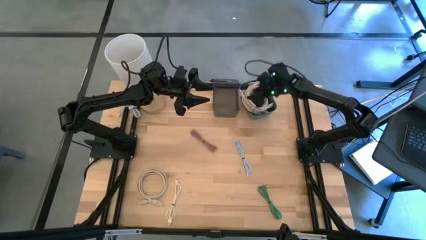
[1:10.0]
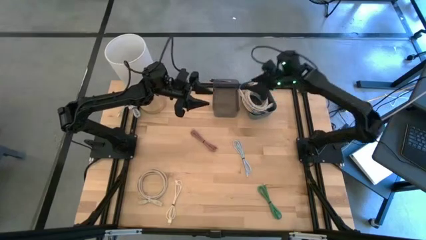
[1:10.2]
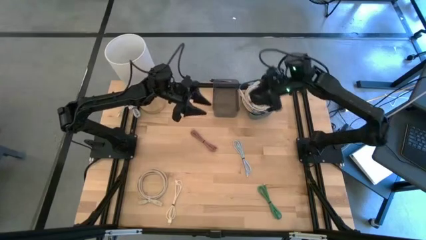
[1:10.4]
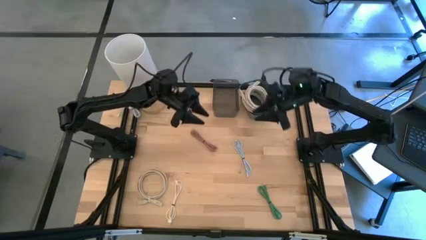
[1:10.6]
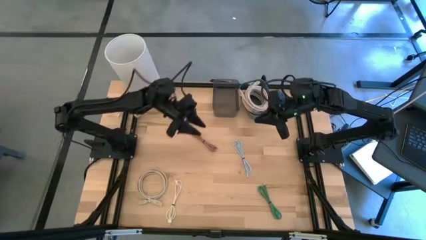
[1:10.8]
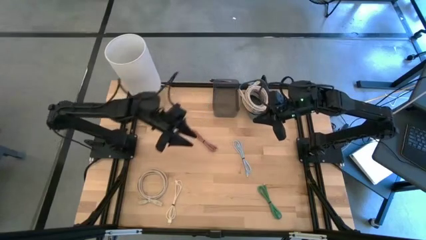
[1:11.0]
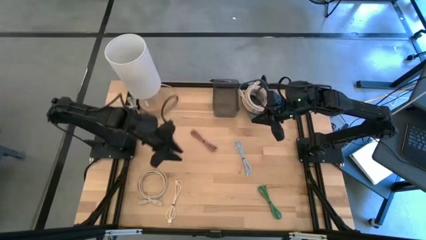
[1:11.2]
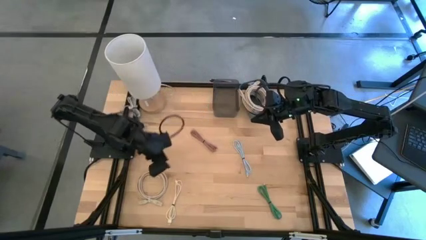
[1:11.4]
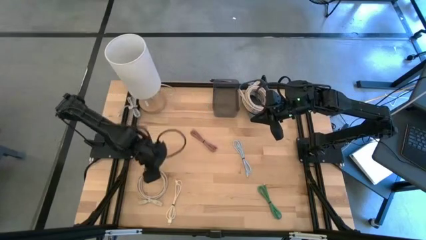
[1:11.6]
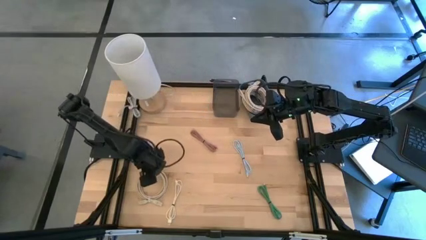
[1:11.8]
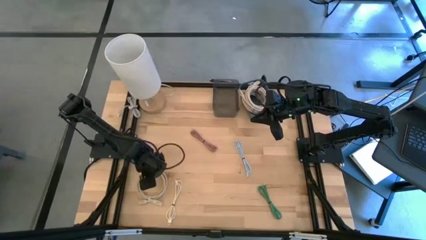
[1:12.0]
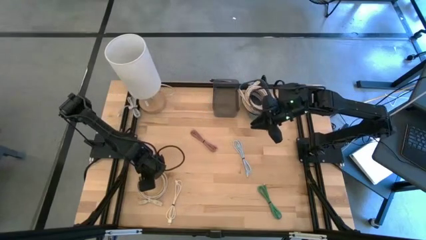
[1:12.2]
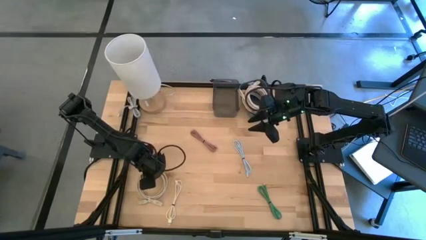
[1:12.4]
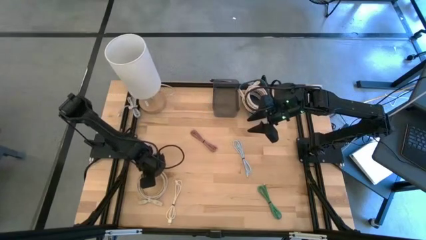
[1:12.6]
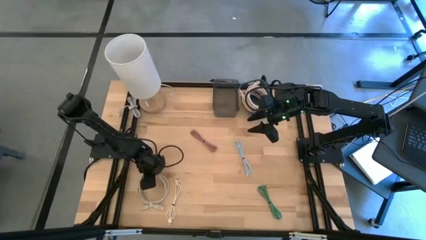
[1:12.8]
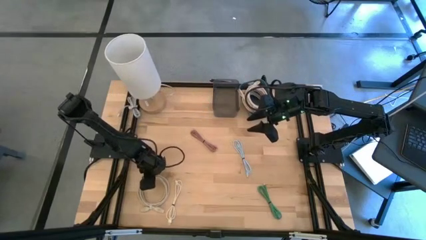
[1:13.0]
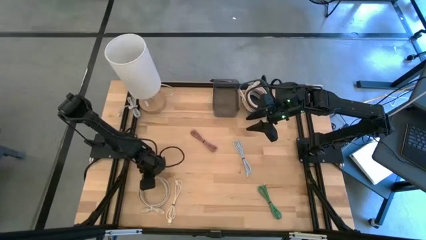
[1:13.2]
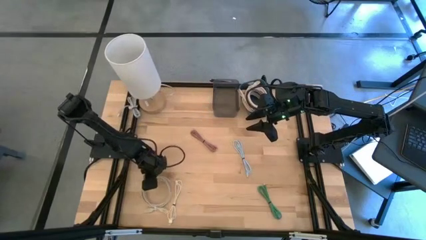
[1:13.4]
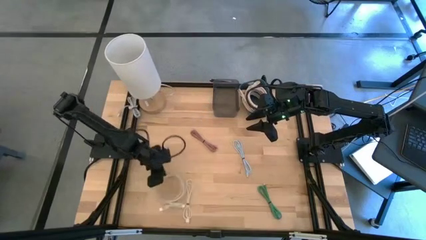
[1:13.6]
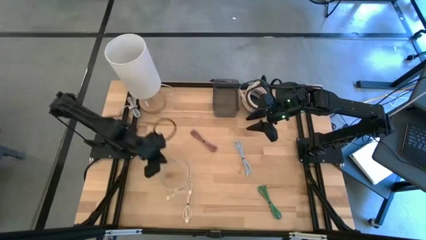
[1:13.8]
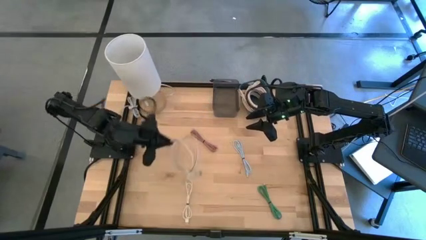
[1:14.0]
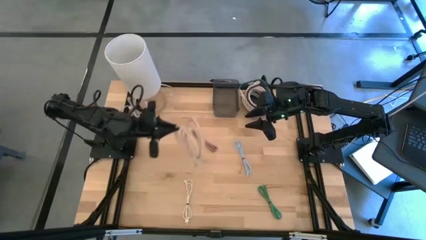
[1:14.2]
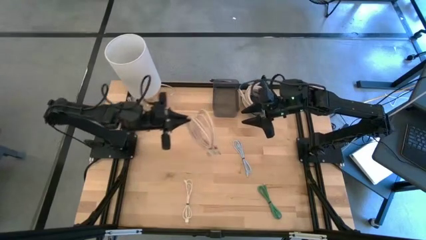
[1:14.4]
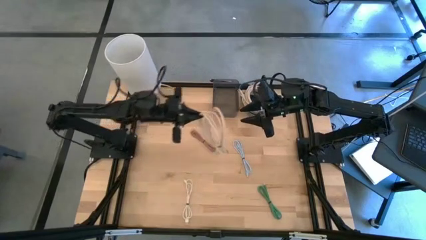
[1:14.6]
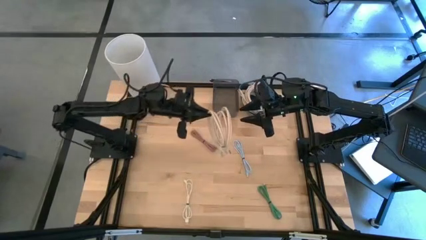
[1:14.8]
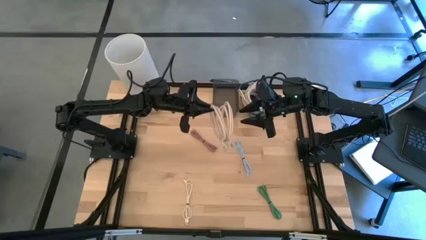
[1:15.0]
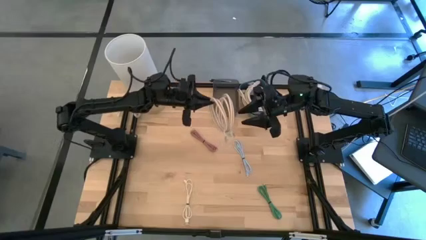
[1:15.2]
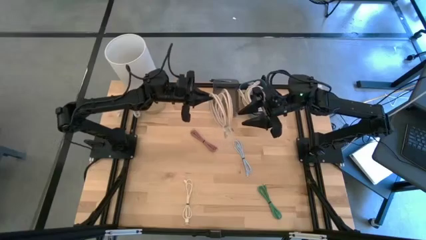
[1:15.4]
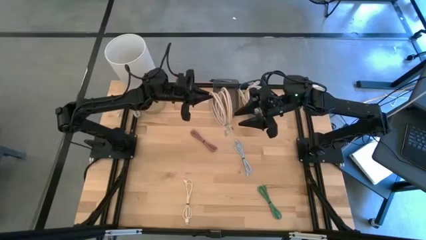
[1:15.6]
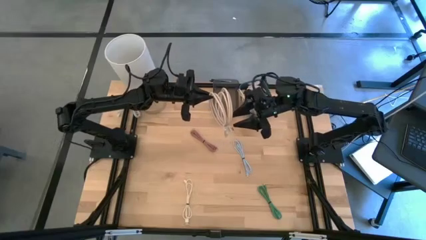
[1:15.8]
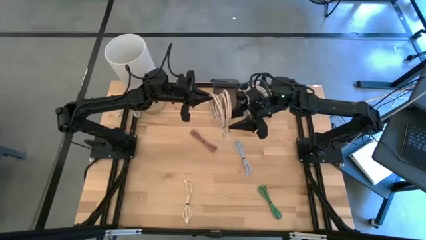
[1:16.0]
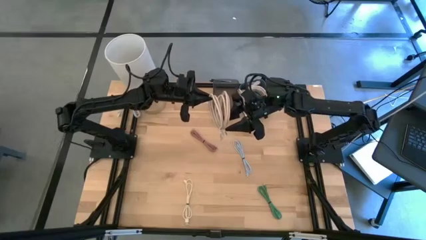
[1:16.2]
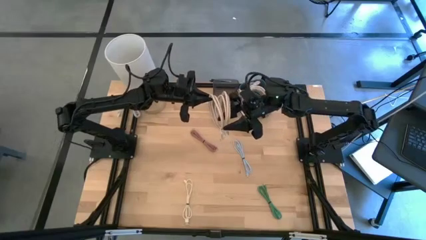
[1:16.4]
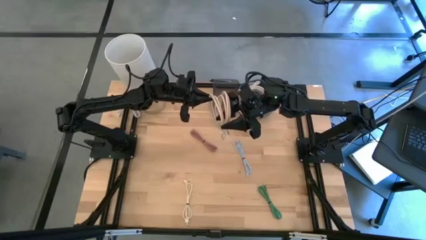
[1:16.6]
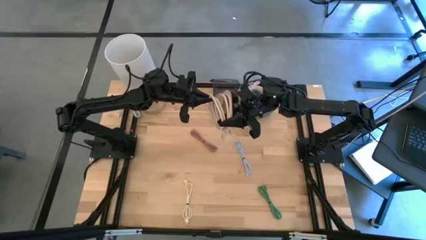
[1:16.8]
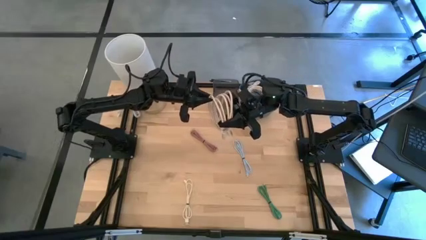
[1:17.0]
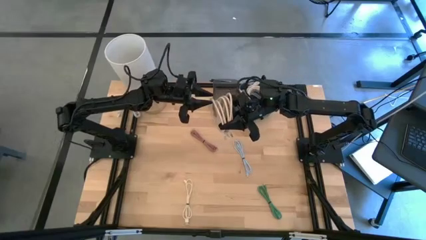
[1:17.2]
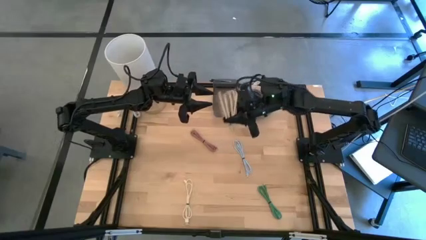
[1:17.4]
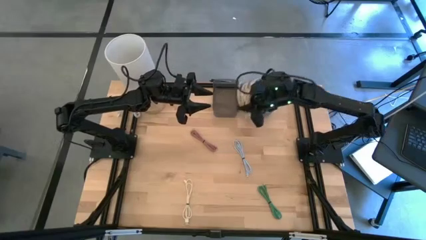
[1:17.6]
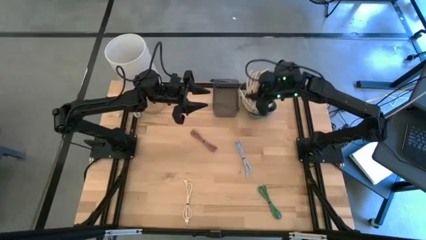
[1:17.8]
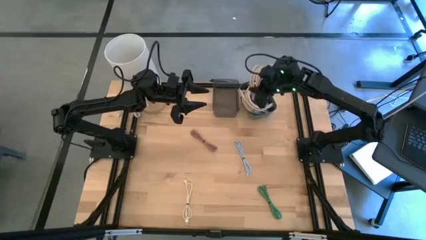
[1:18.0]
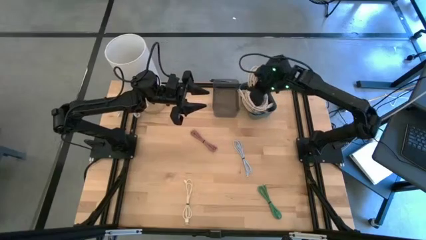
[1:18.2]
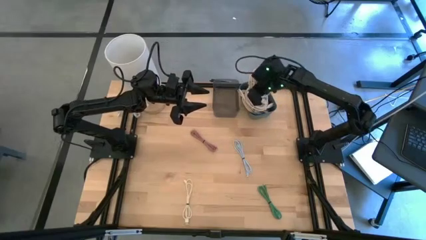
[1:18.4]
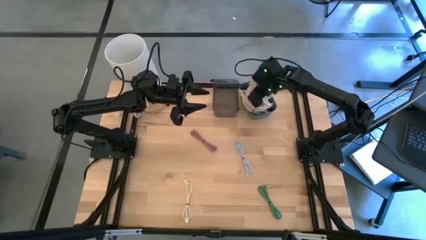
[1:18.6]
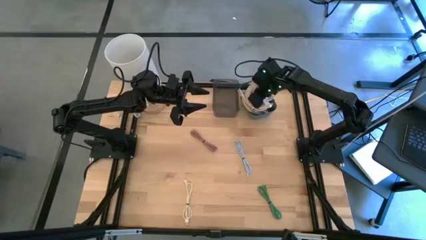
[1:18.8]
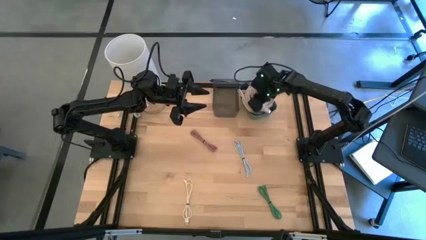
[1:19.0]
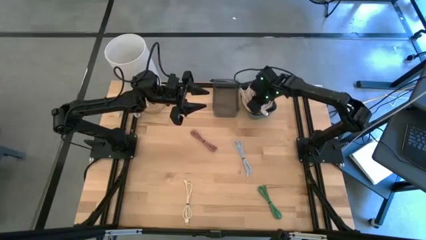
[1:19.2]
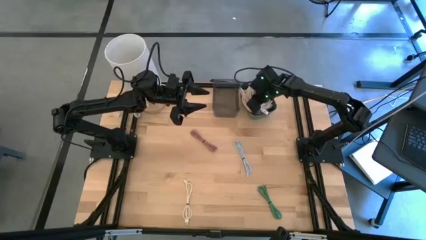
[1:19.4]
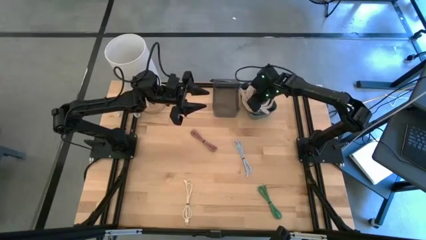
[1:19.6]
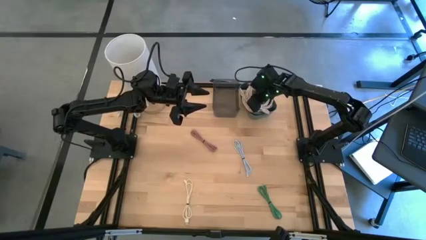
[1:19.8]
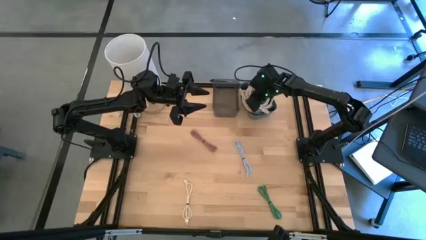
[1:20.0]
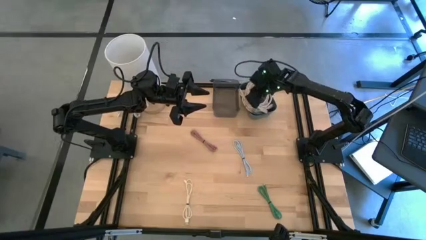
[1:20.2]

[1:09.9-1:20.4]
Put the light brown HDMI cable into the blue bin

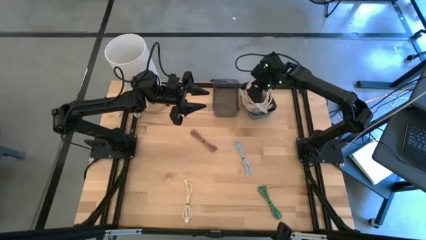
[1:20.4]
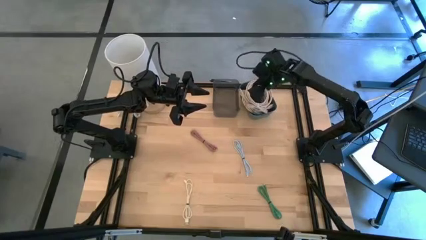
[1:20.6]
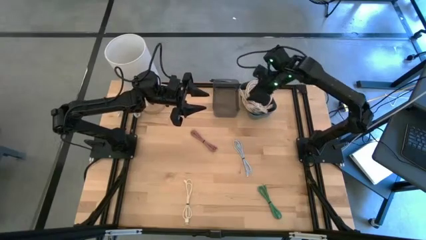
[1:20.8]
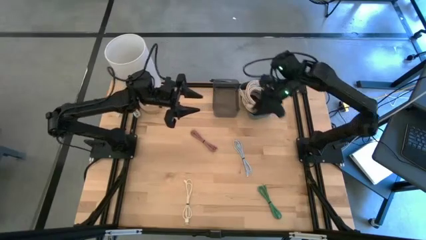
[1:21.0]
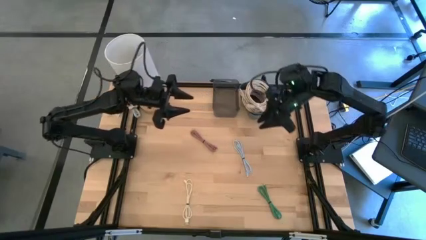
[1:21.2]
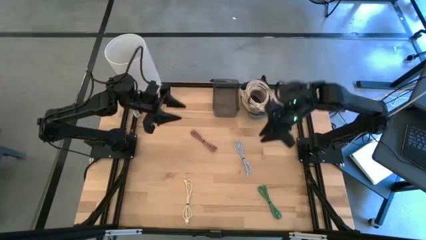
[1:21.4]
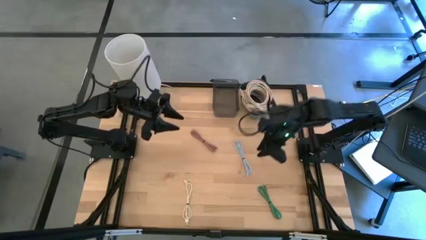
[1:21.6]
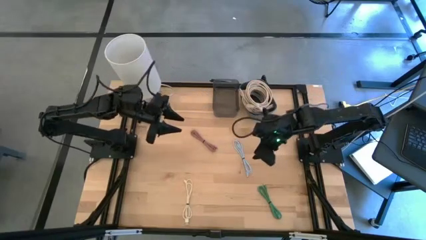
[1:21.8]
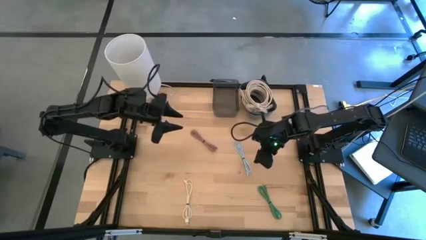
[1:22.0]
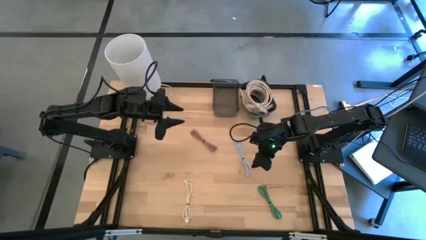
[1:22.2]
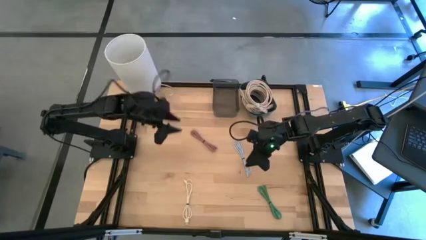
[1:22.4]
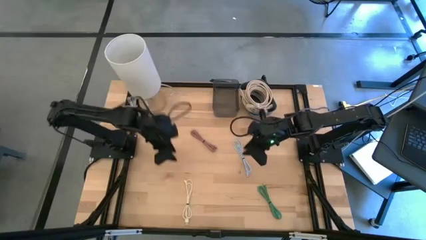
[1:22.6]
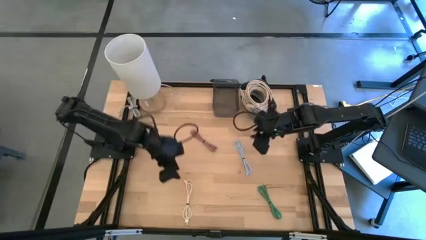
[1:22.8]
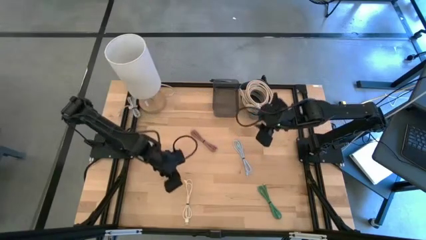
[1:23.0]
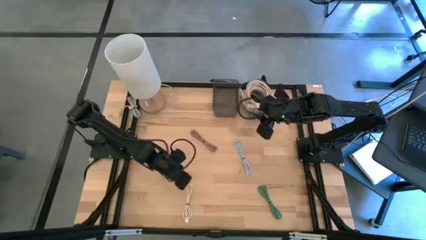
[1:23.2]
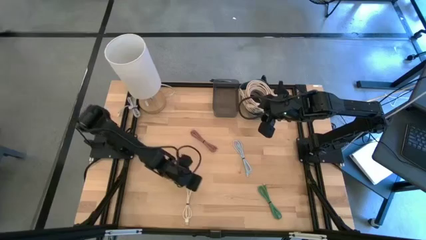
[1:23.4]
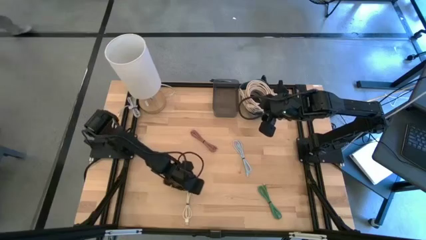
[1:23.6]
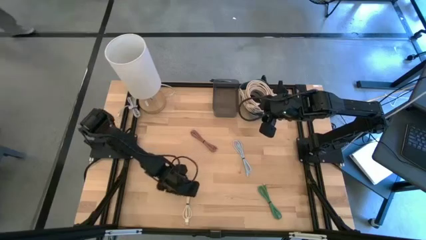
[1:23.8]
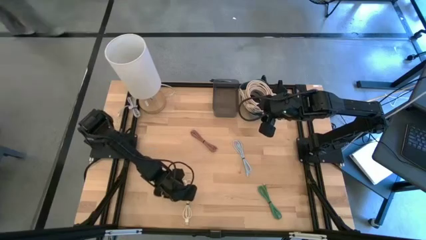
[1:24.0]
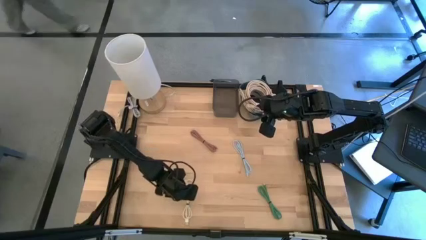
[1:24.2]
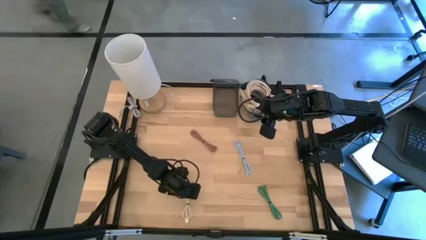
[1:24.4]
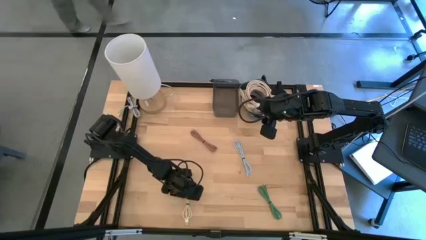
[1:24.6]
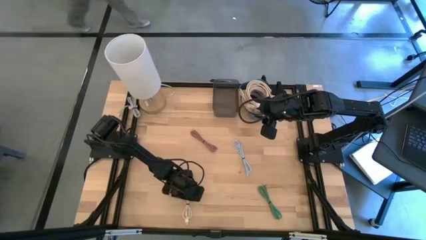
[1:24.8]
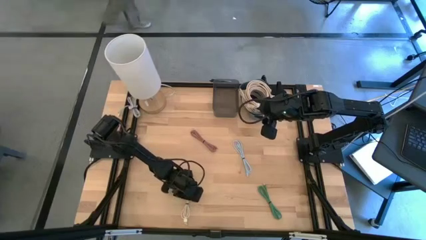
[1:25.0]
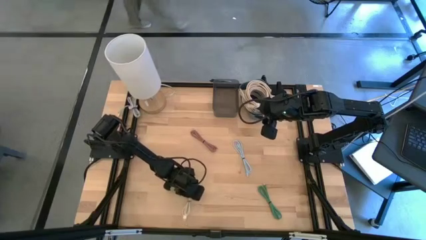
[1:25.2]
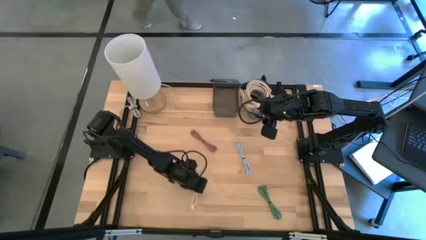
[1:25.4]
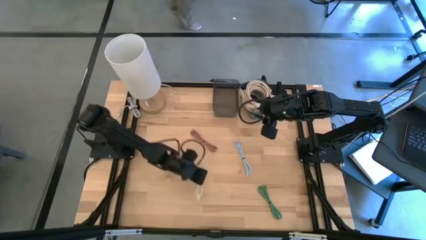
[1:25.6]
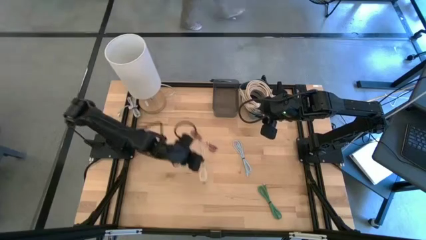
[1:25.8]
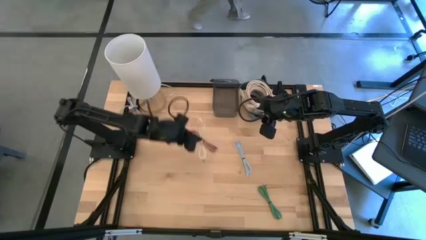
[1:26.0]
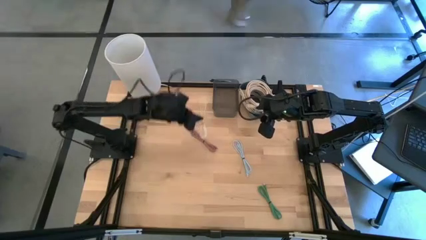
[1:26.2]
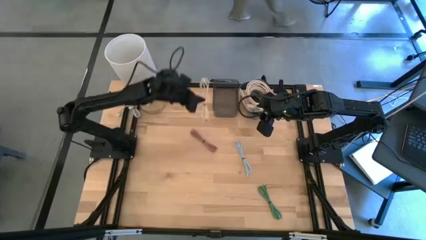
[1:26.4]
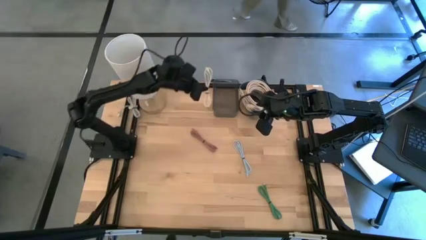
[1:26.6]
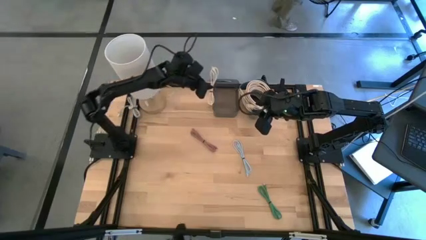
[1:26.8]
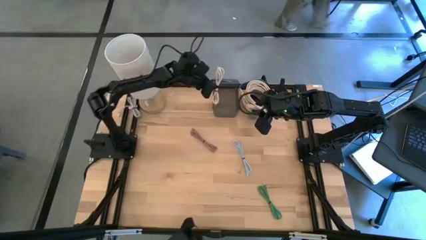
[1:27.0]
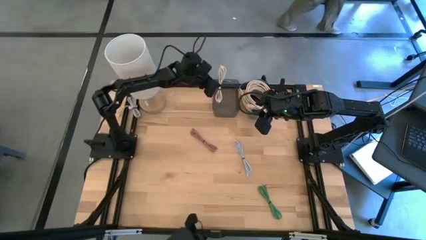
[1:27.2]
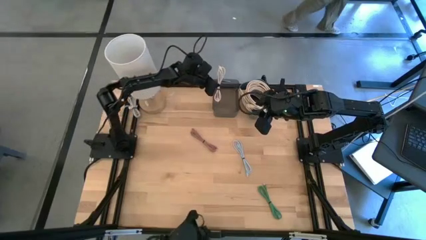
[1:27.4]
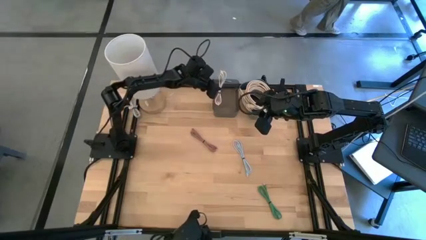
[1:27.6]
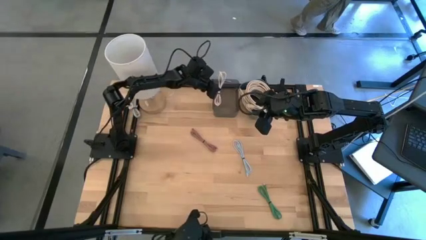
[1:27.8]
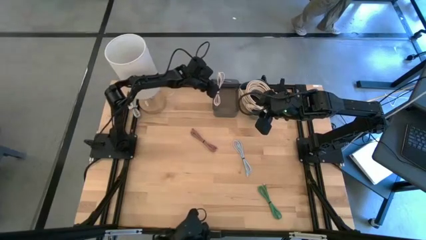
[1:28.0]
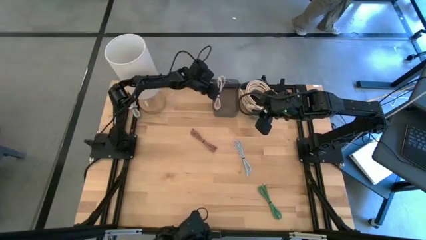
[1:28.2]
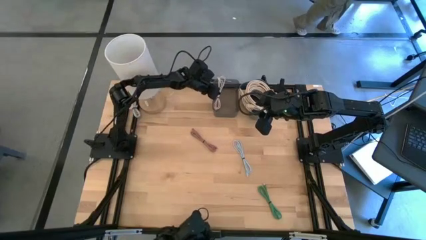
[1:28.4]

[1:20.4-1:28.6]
Put the white charger cable into the black transparent bin
